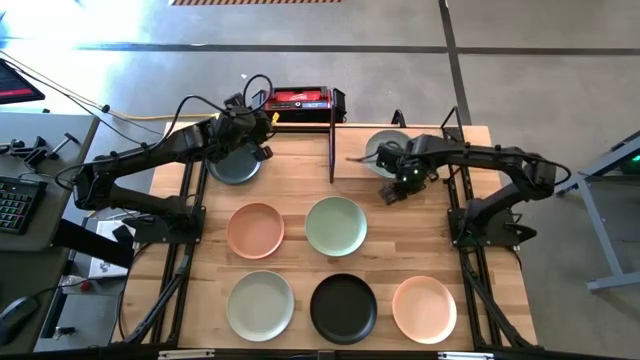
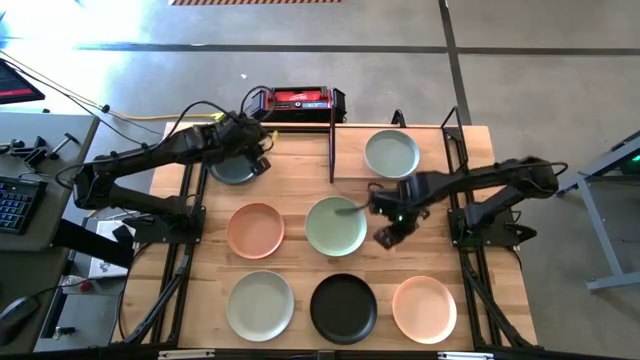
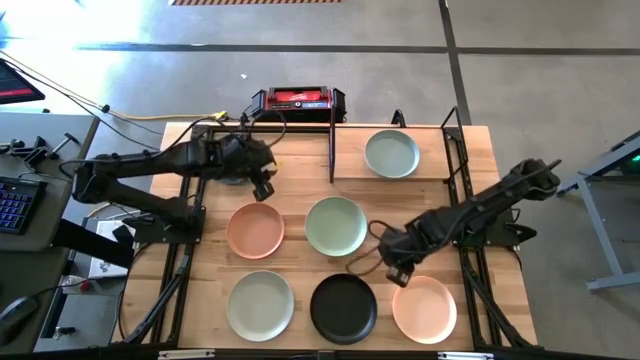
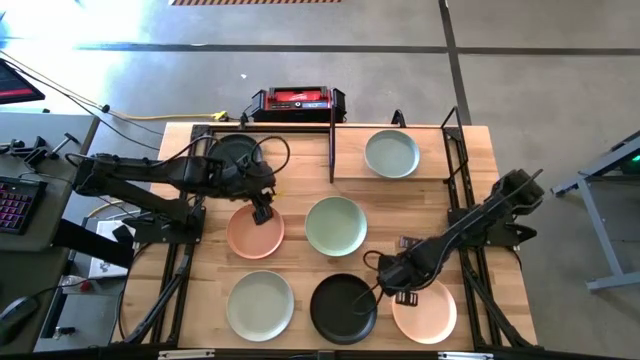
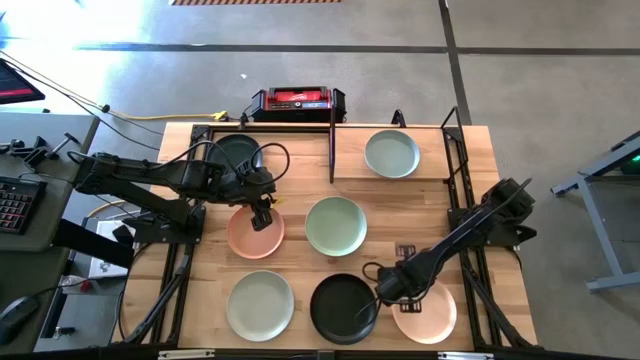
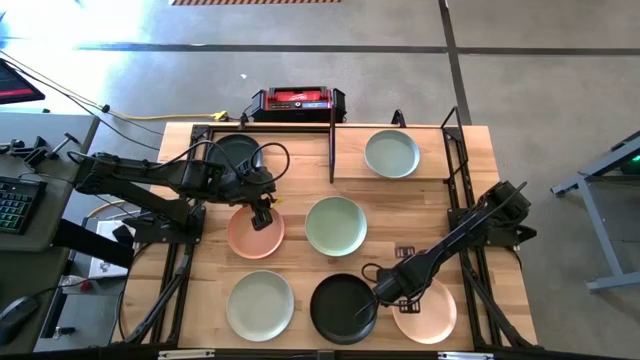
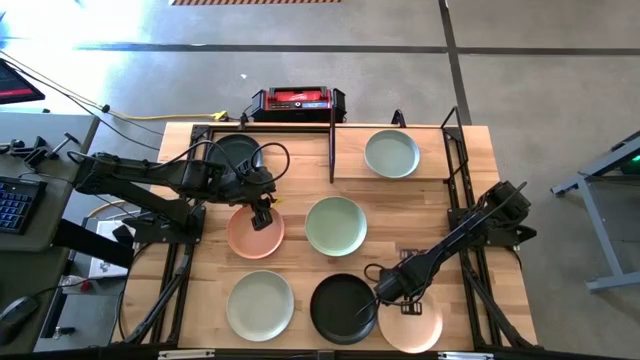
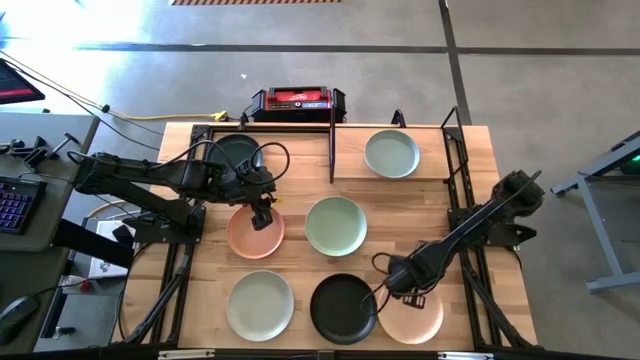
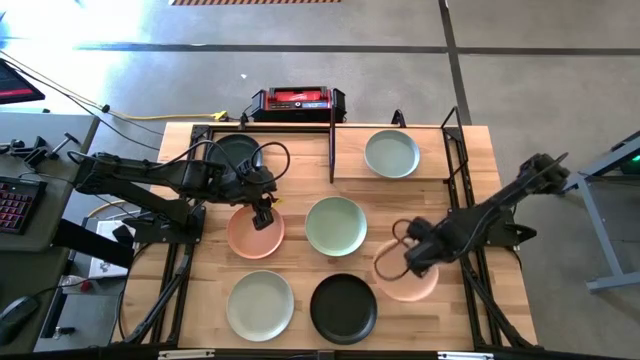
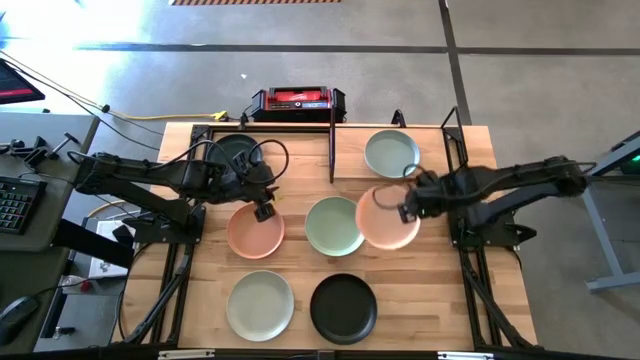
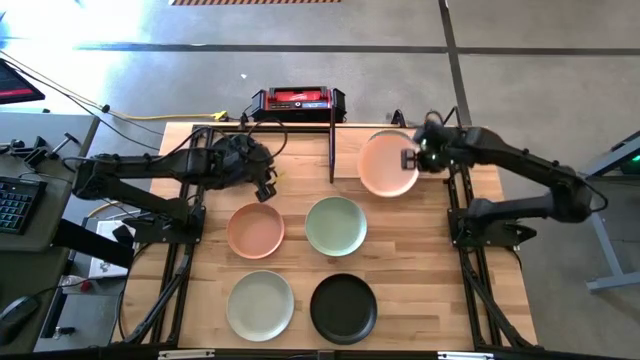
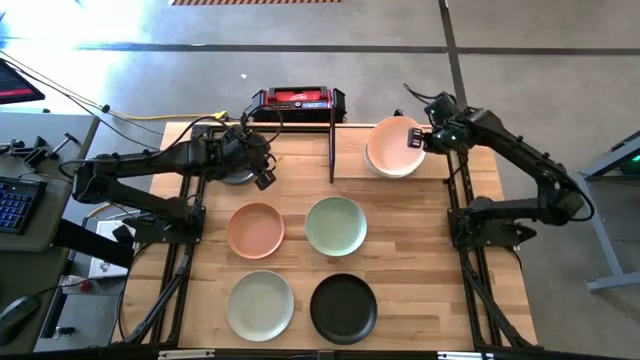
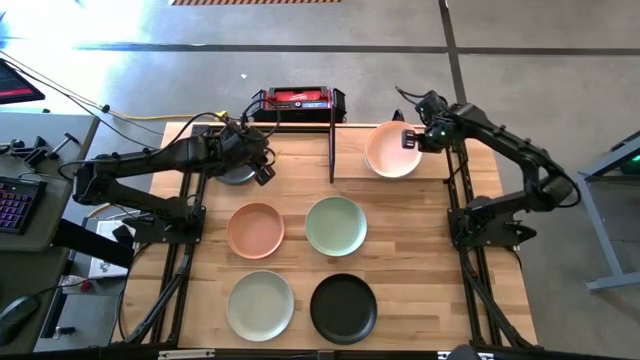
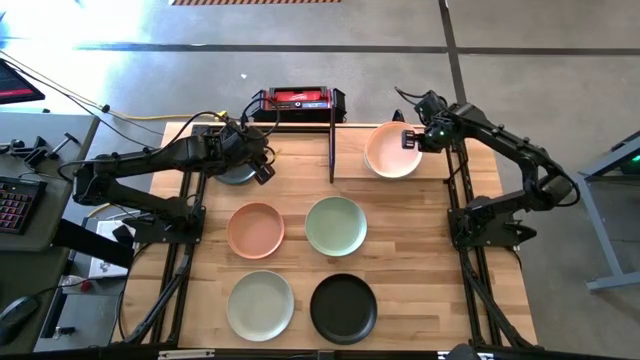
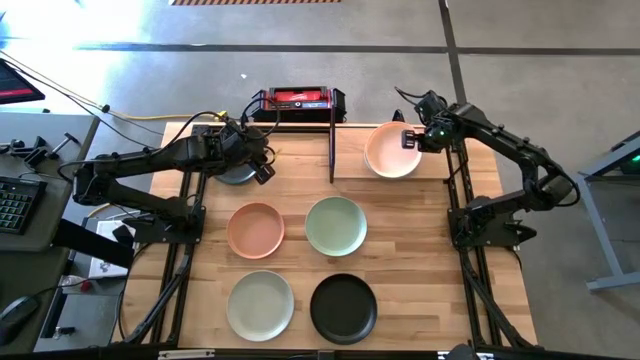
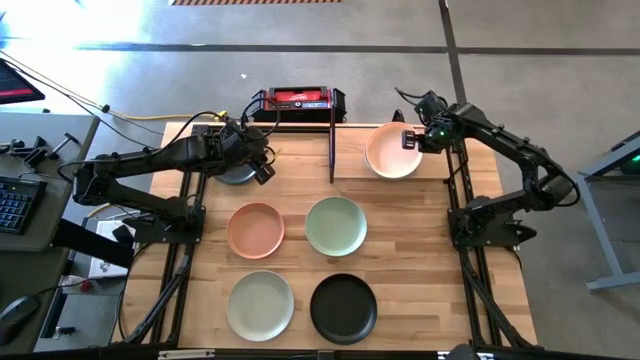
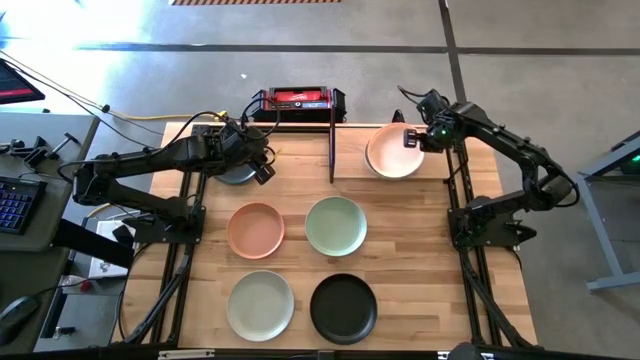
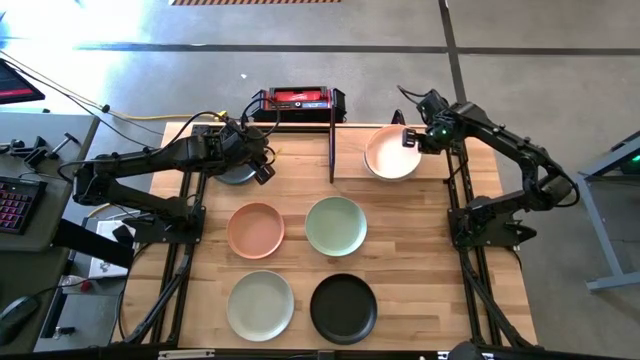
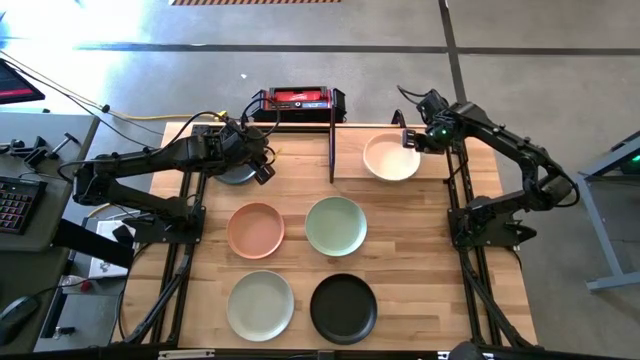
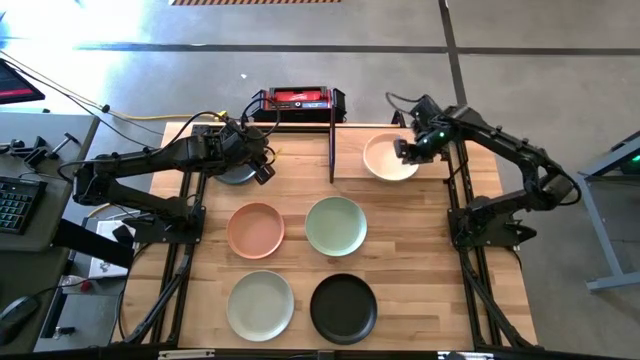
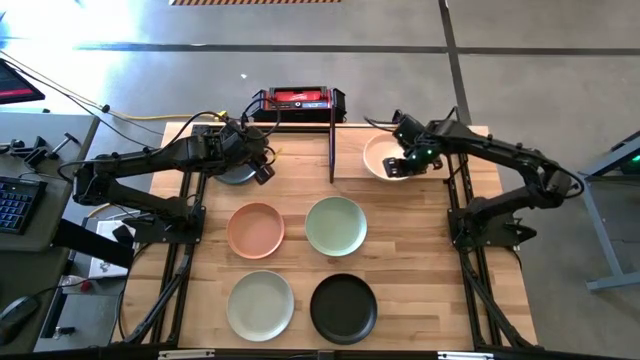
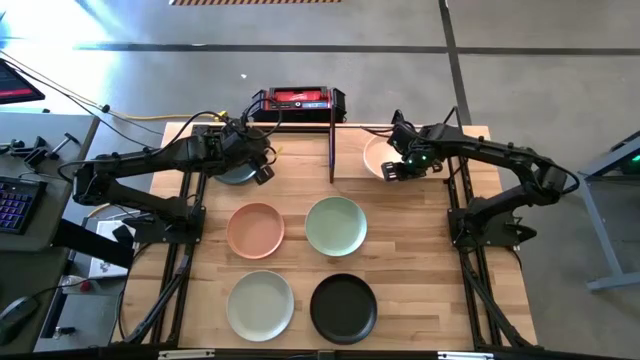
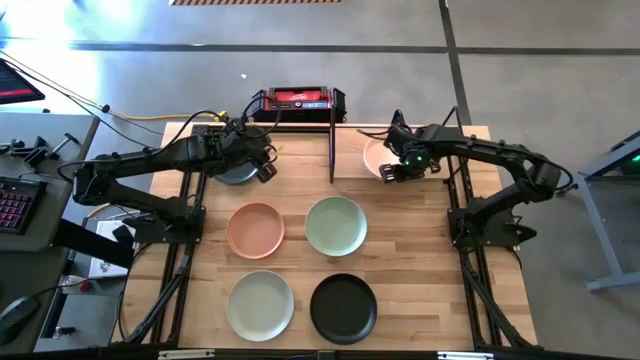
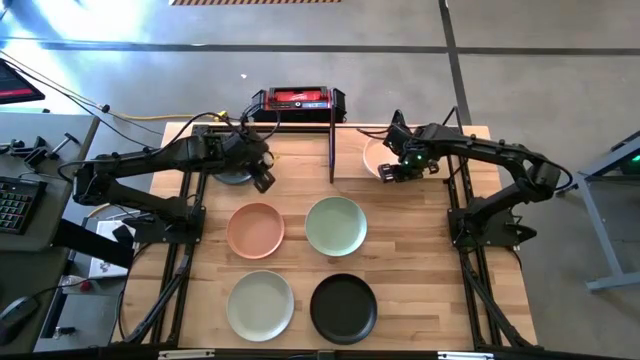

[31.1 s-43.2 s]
Task: Place and stack plates onto a shelf
Stack the light pink plate on top of the light blue plate on the shelf

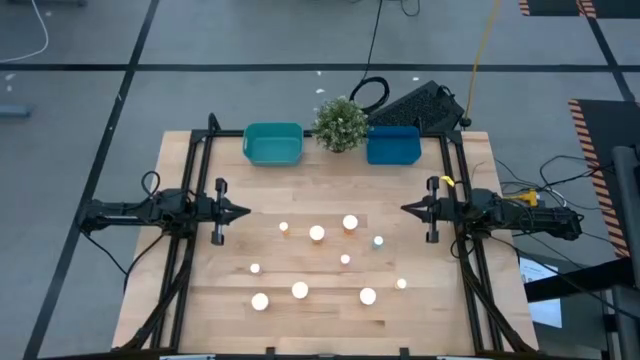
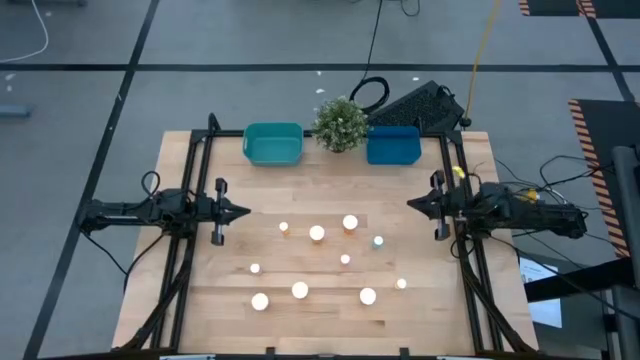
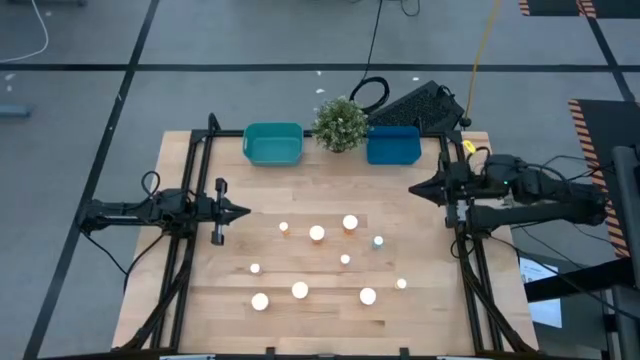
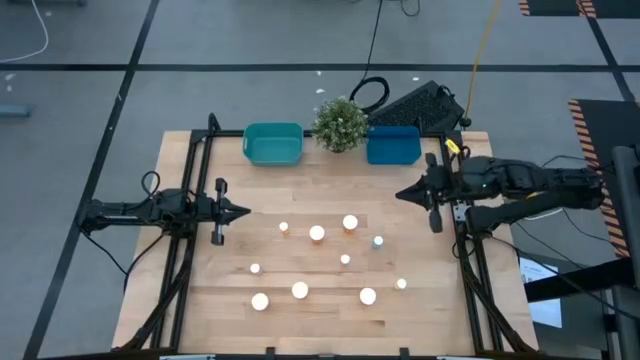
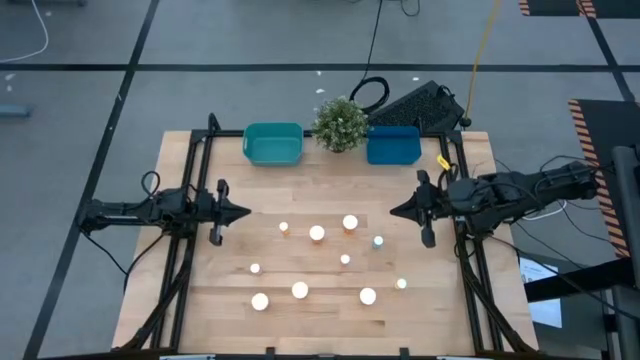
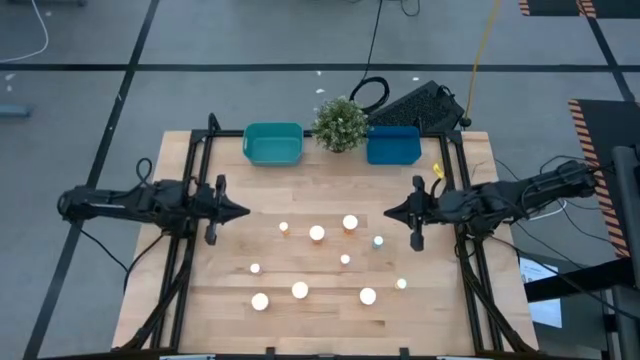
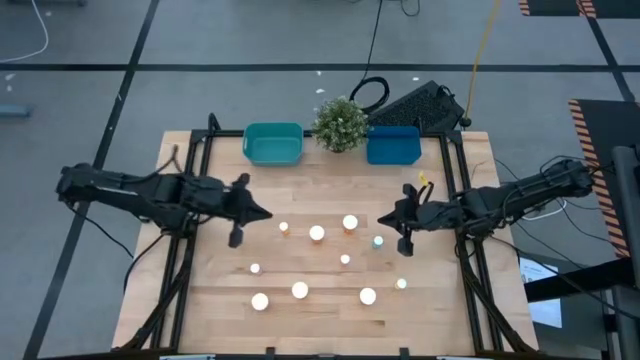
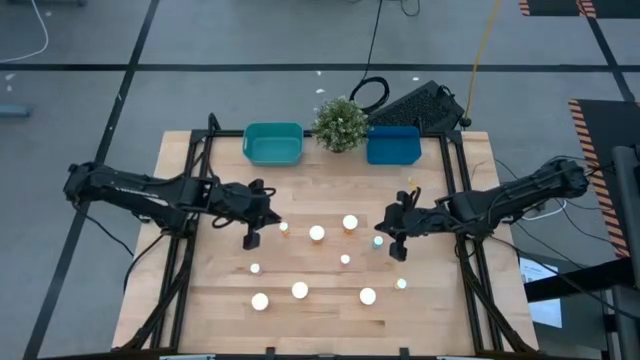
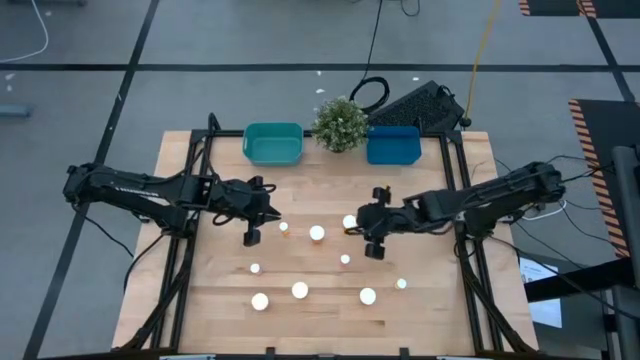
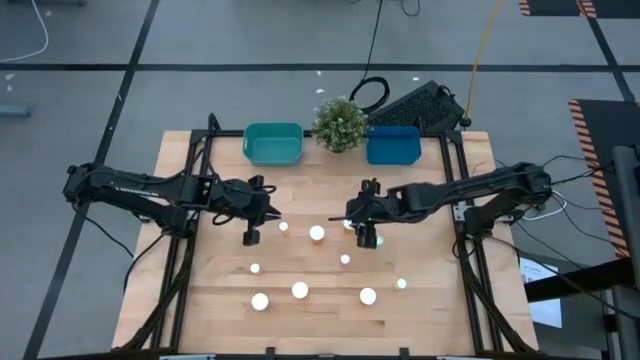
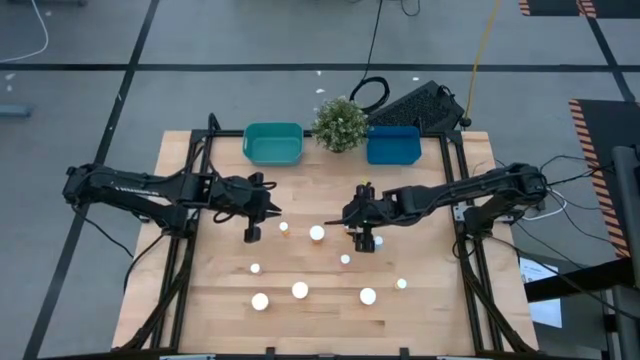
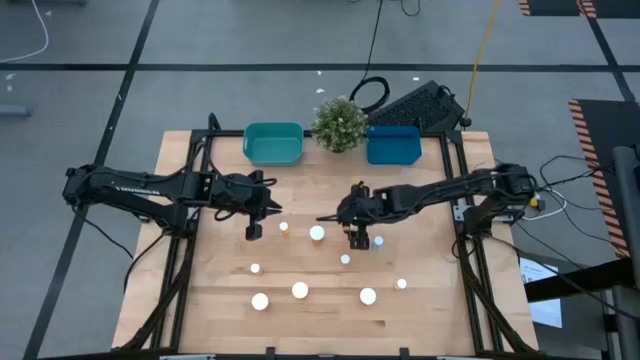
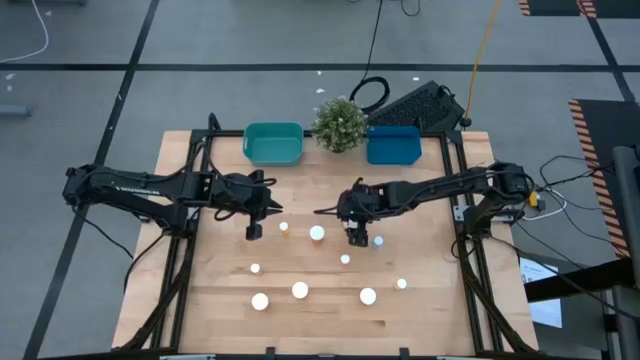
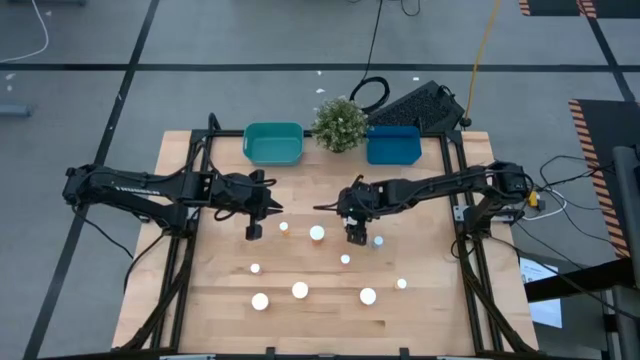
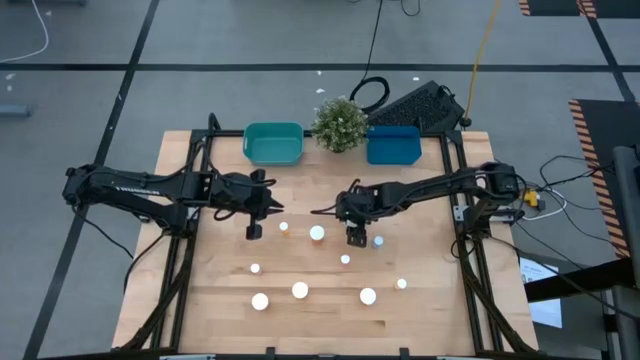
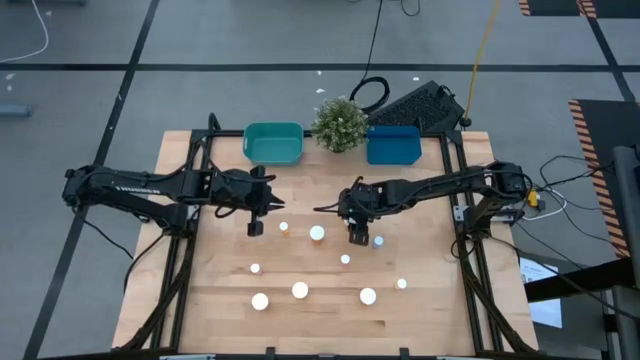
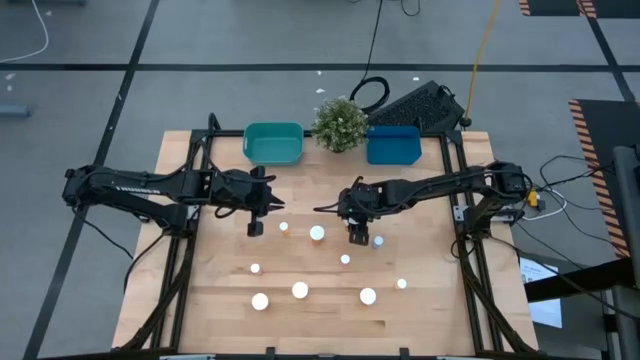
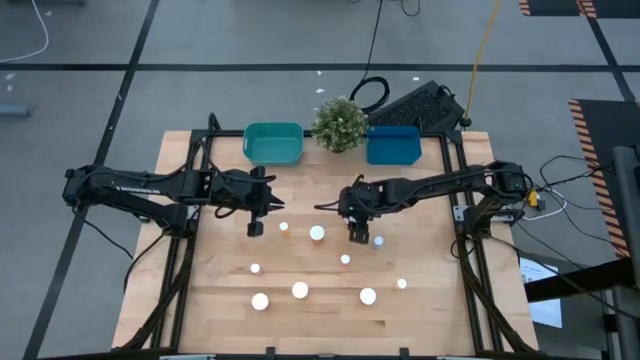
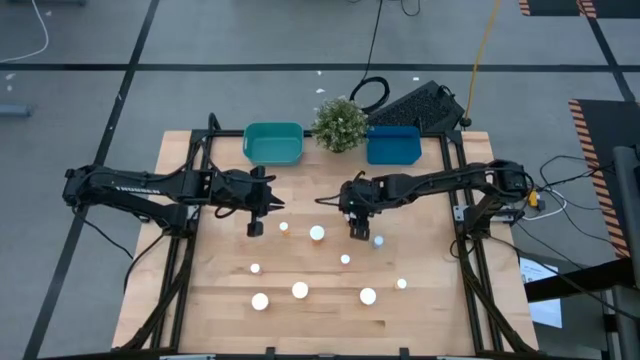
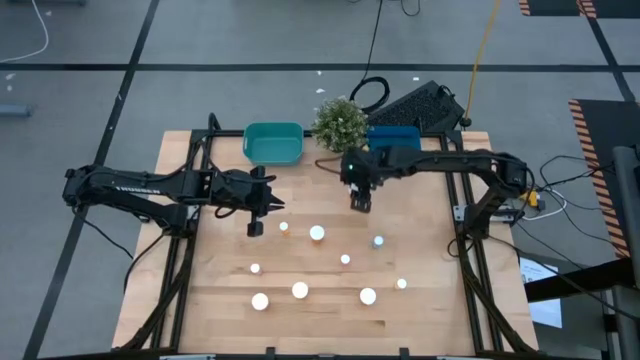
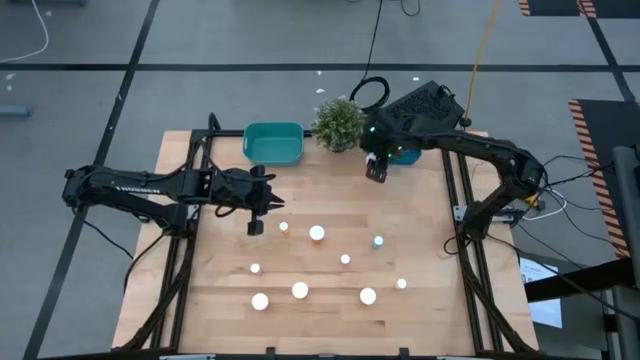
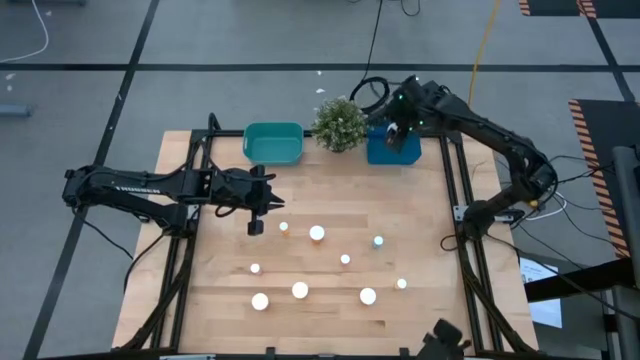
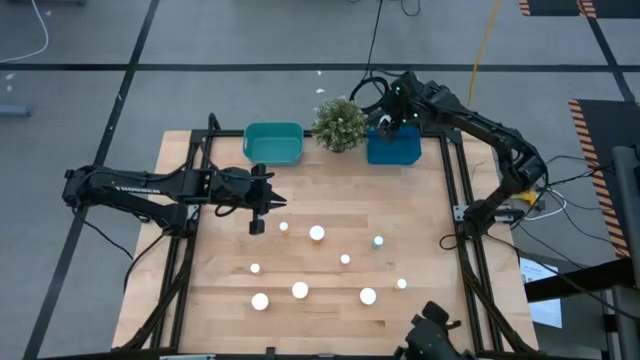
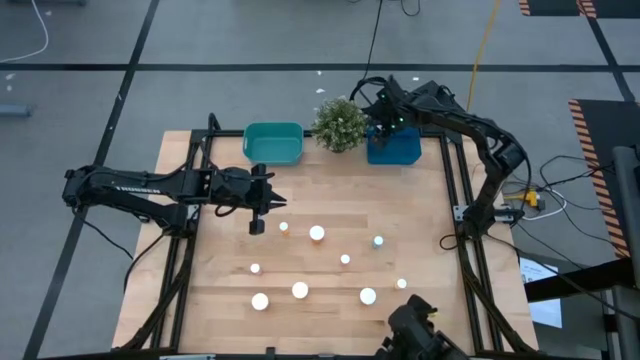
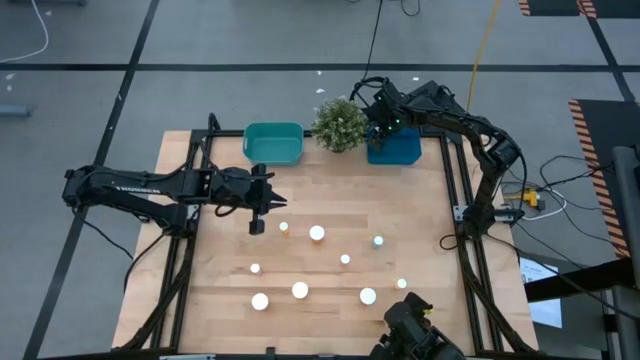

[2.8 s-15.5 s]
Task: Pick and place medicine bottles into bin by pill shape (circle, oval)
Put the large orange pill bottle into the blue bin
